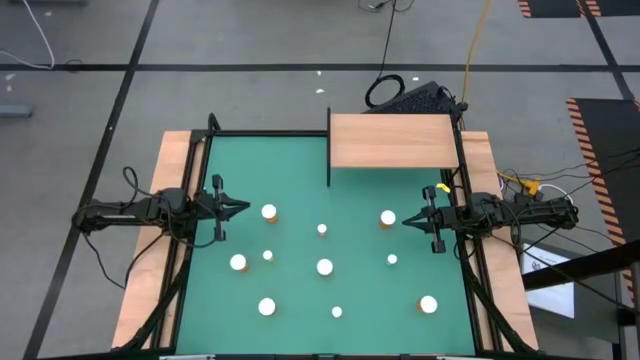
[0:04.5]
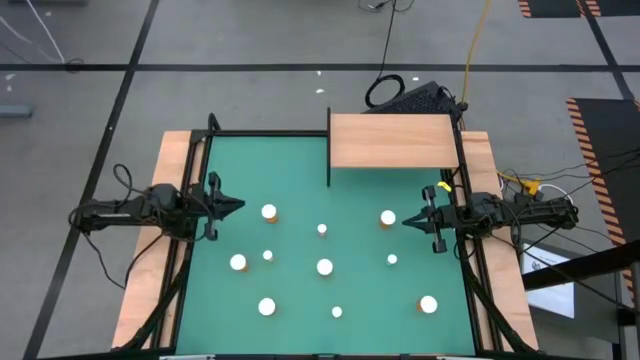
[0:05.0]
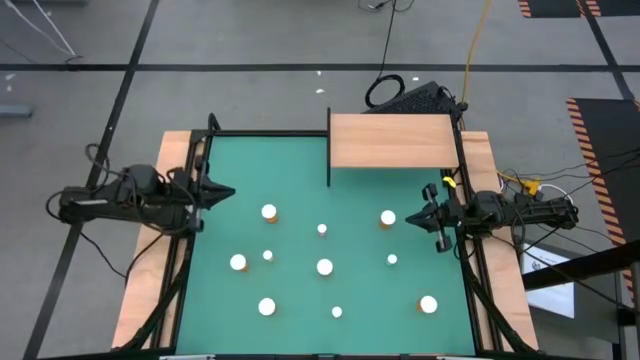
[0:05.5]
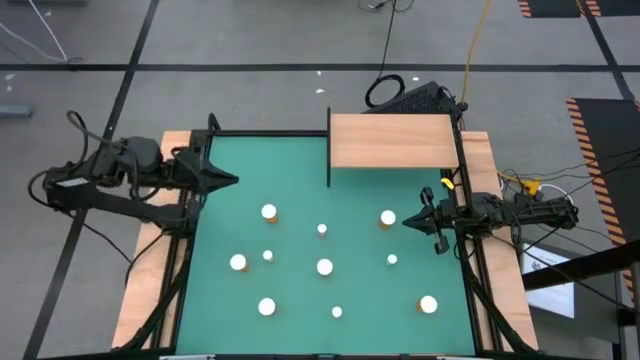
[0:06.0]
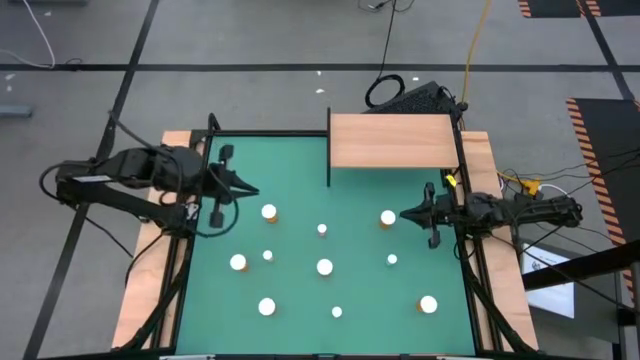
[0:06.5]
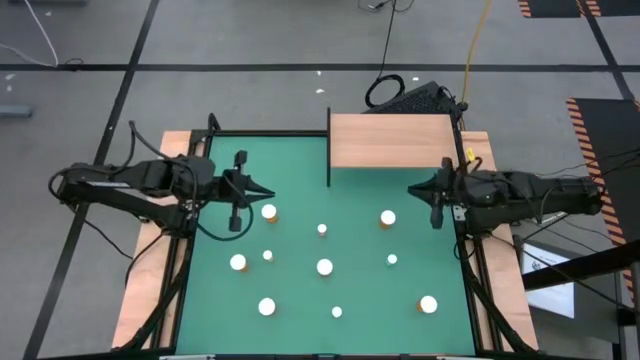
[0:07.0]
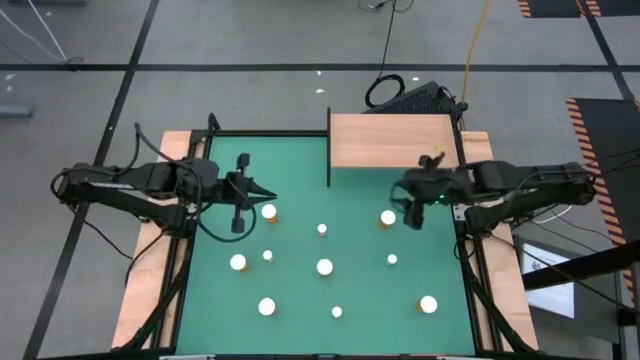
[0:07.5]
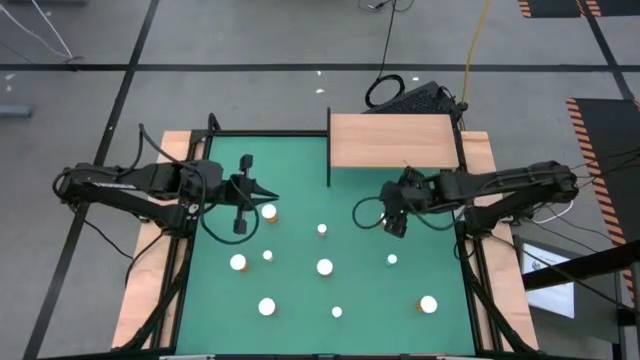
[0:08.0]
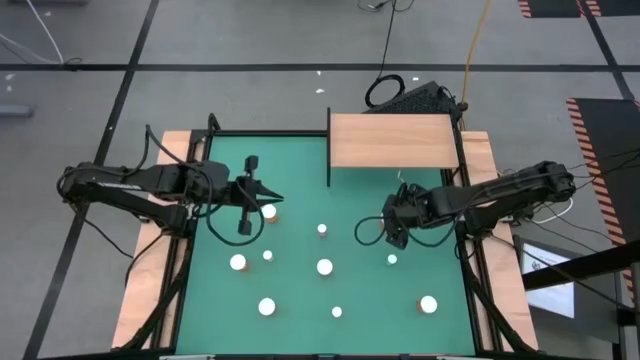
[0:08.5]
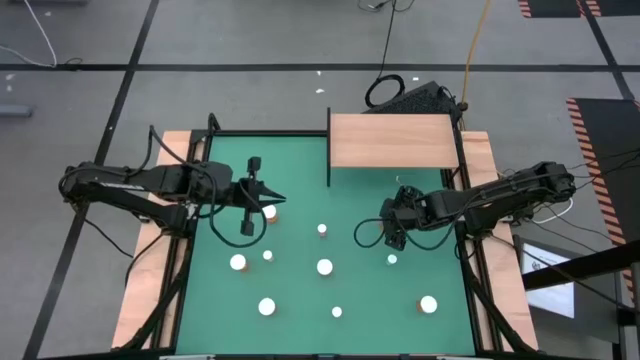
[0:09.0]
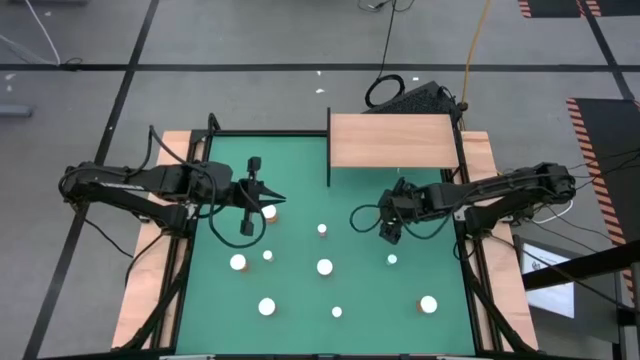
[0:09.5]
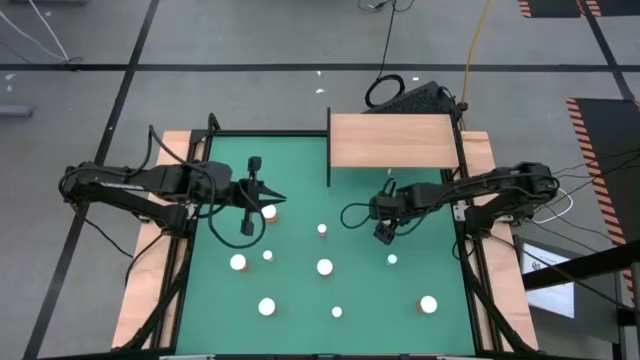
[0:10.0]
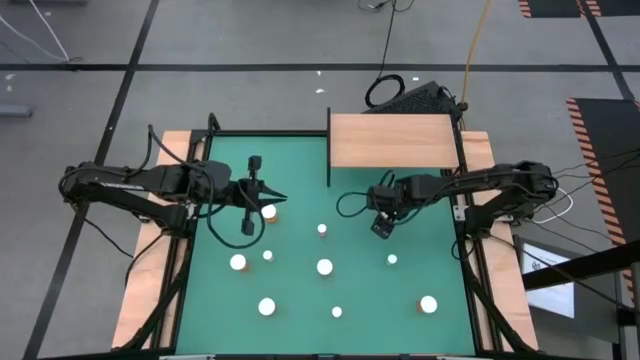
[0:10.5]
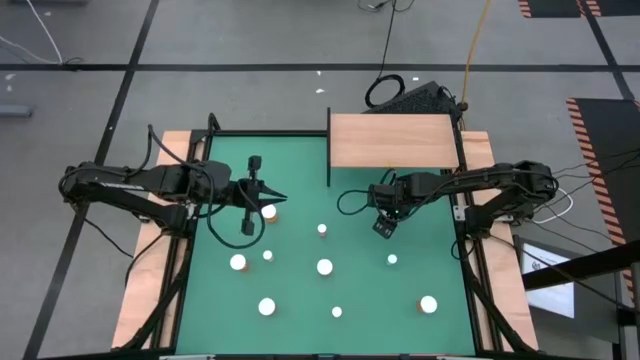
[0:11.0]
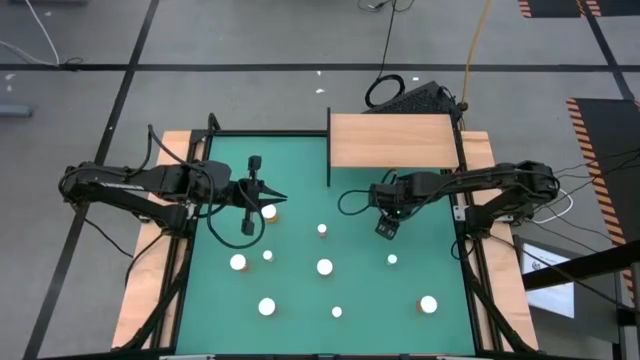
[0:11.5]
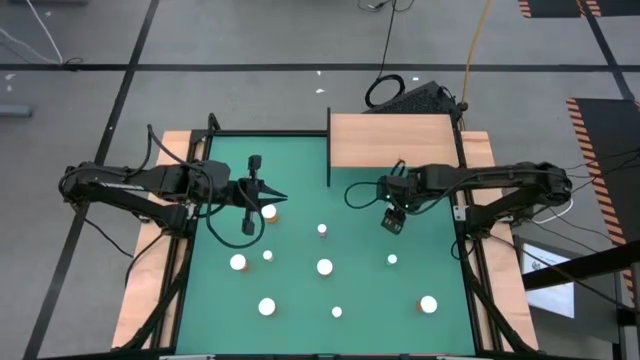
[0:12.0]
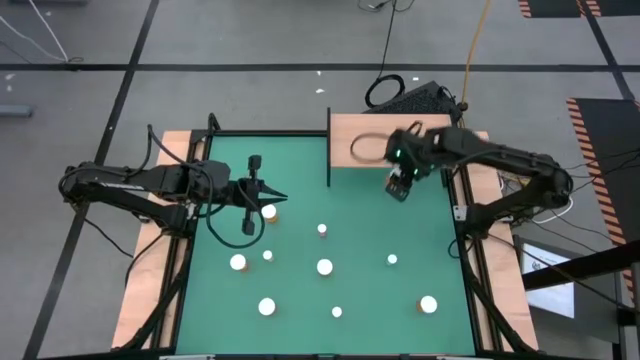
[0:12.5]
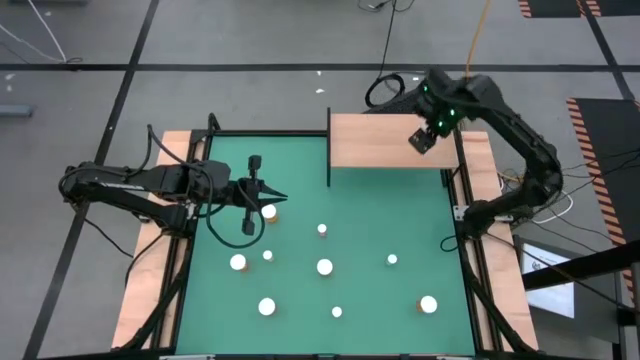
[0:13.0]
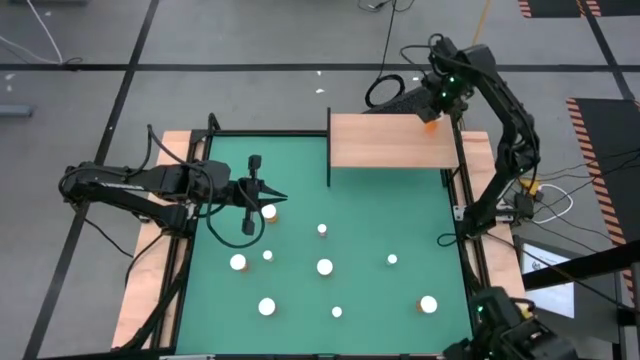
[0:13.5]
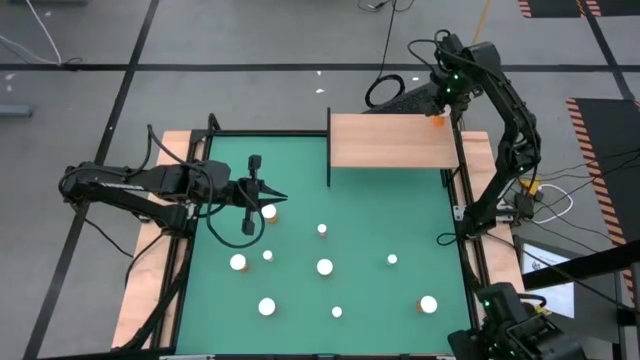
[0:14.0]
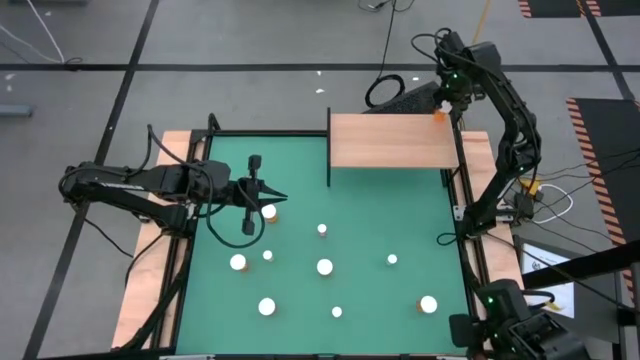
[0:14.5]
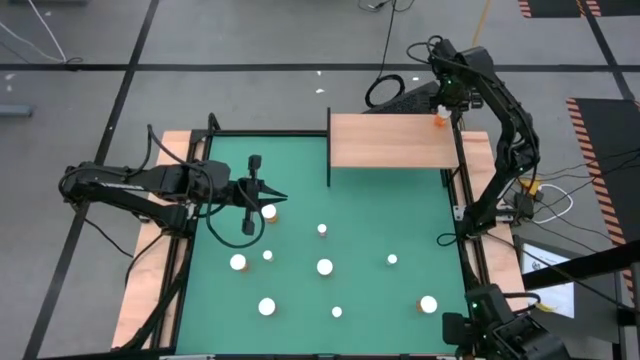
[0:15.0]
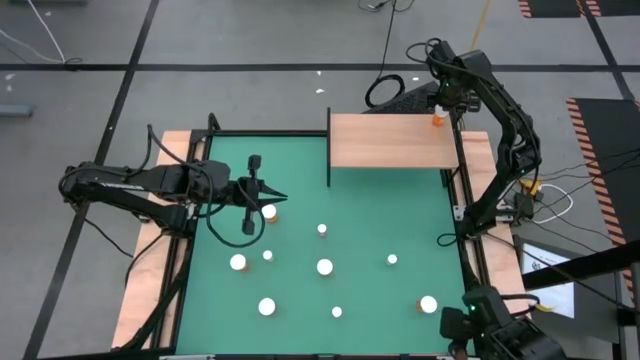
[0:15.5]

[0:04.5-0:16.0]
Task: Pick and place medicine bottles onto shelf by color
Put the orange pill bottle on the shelf

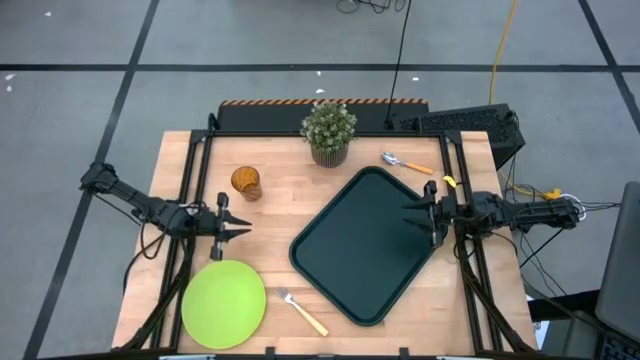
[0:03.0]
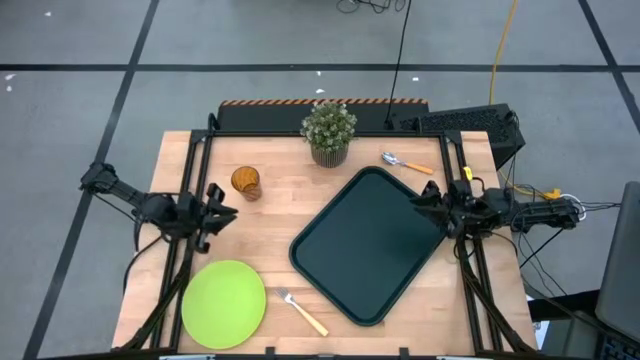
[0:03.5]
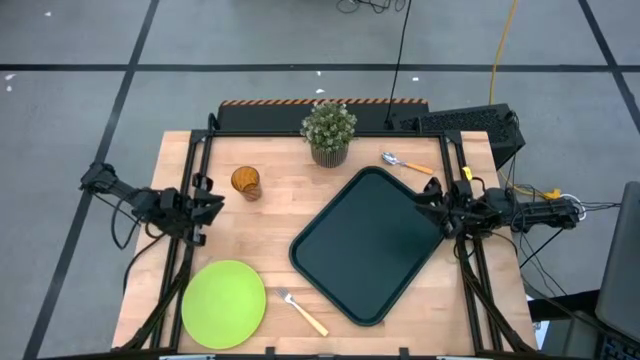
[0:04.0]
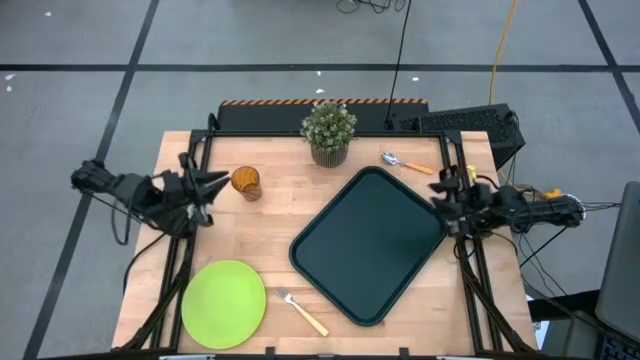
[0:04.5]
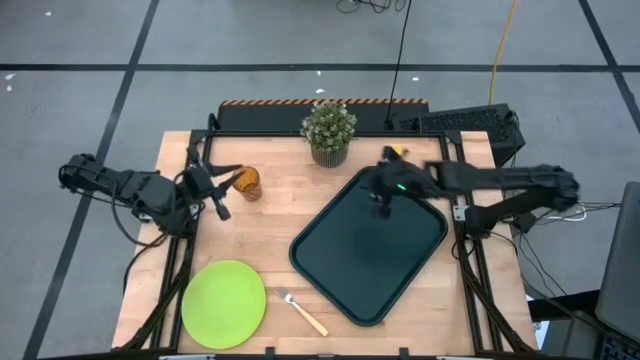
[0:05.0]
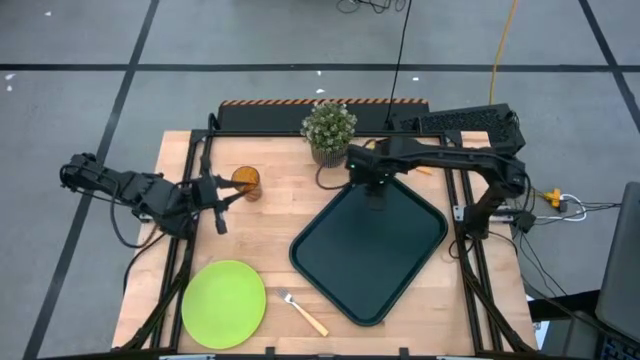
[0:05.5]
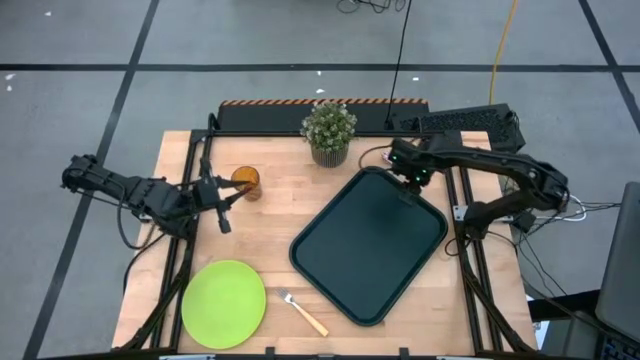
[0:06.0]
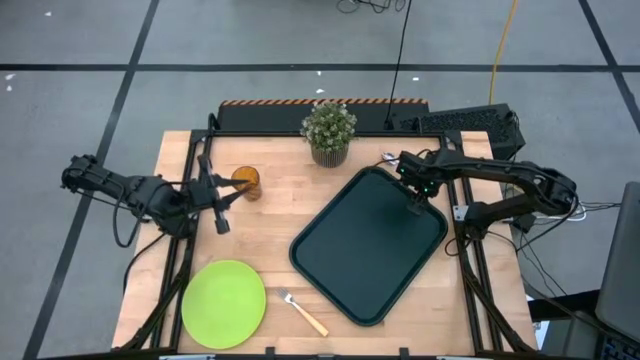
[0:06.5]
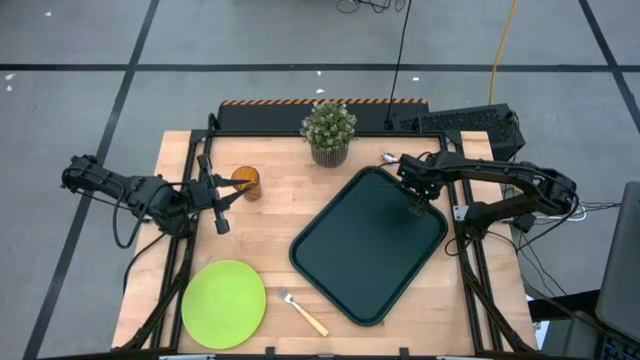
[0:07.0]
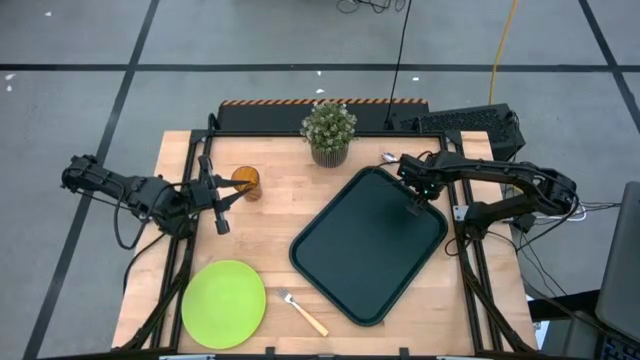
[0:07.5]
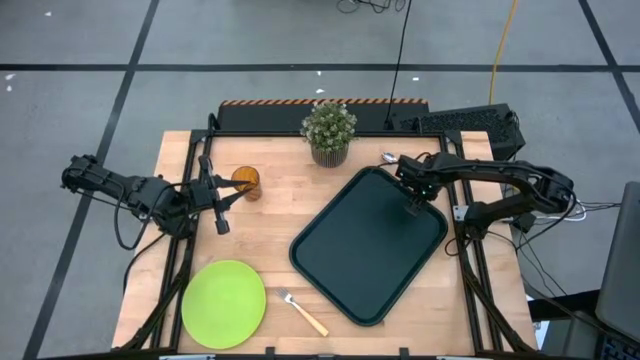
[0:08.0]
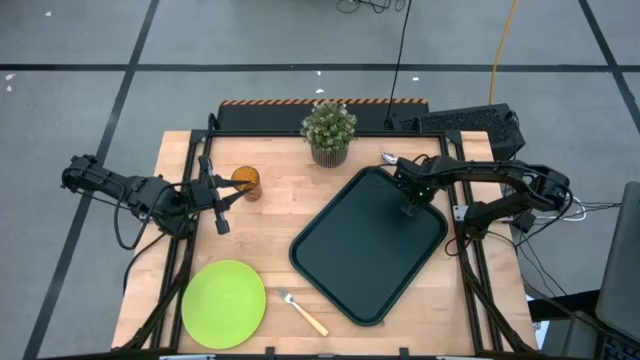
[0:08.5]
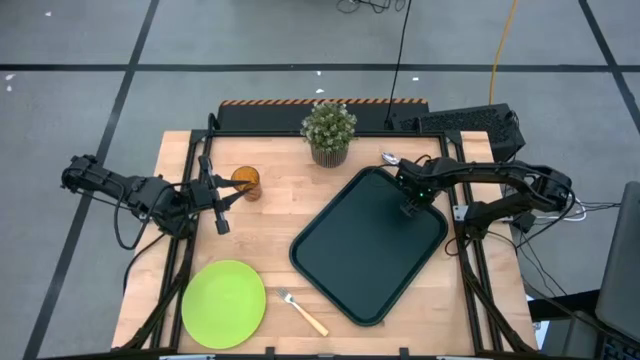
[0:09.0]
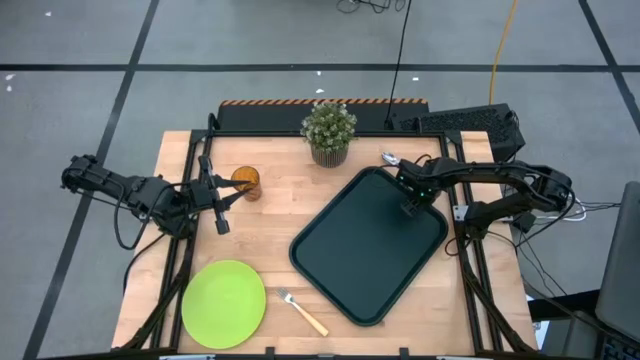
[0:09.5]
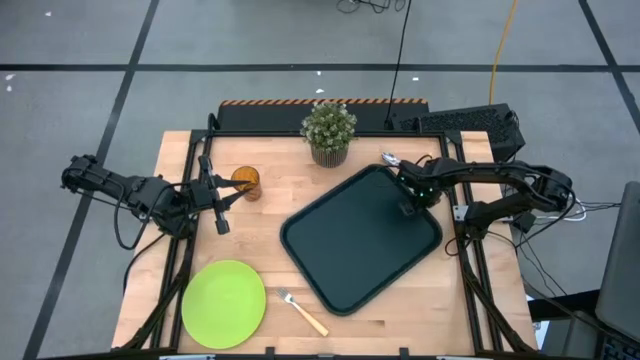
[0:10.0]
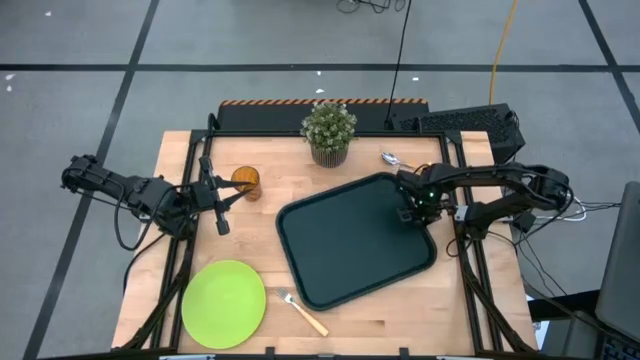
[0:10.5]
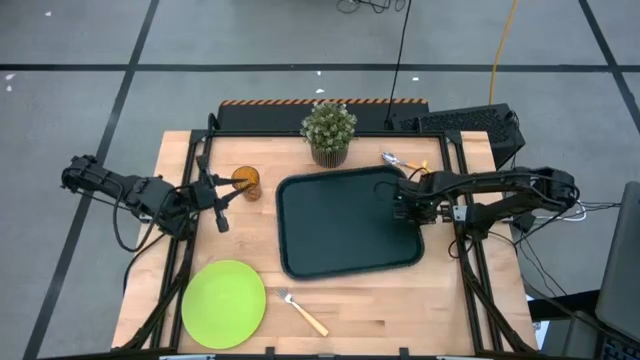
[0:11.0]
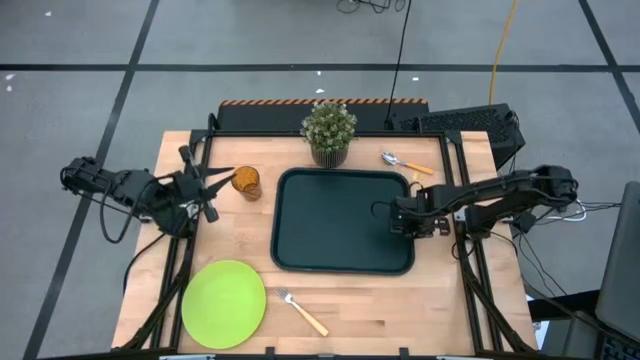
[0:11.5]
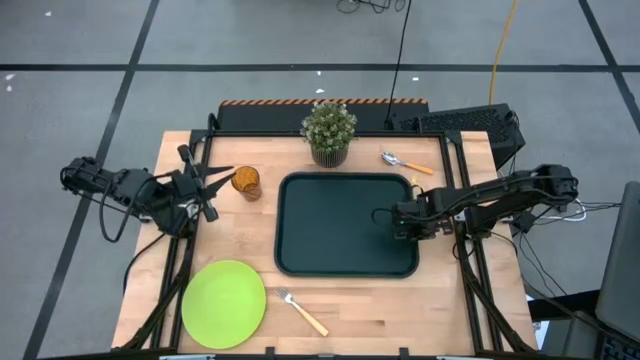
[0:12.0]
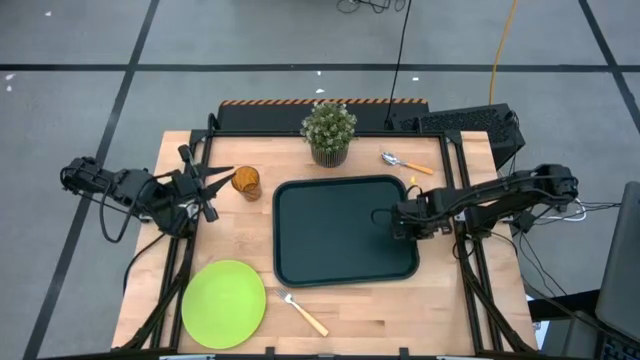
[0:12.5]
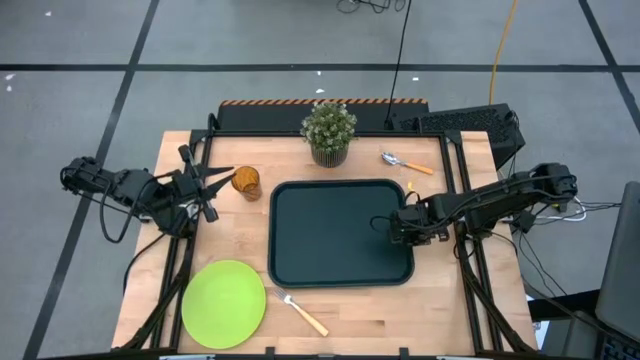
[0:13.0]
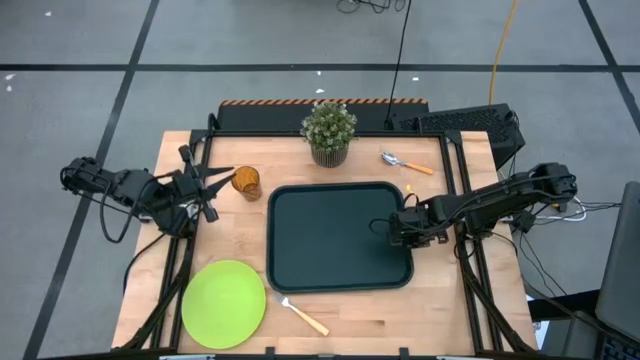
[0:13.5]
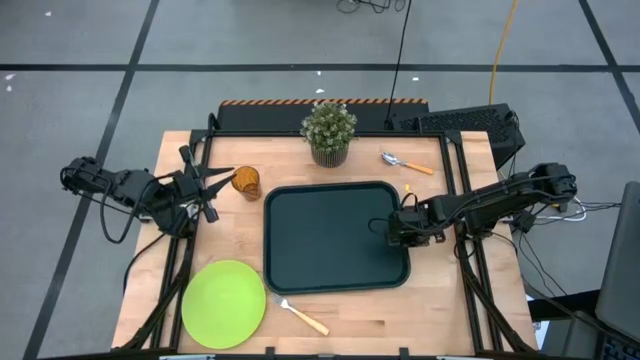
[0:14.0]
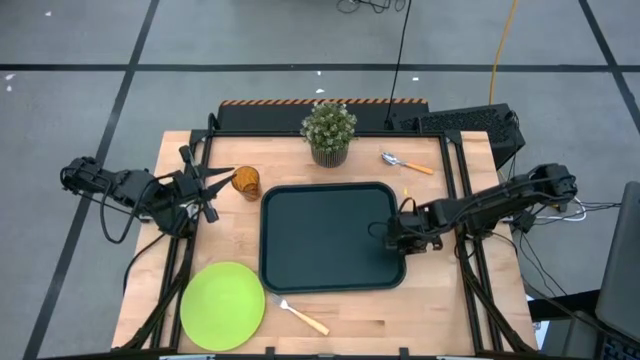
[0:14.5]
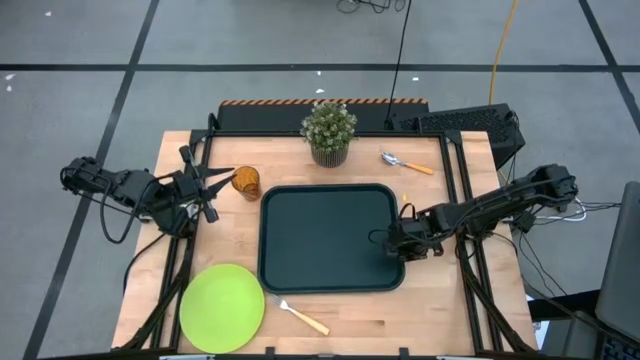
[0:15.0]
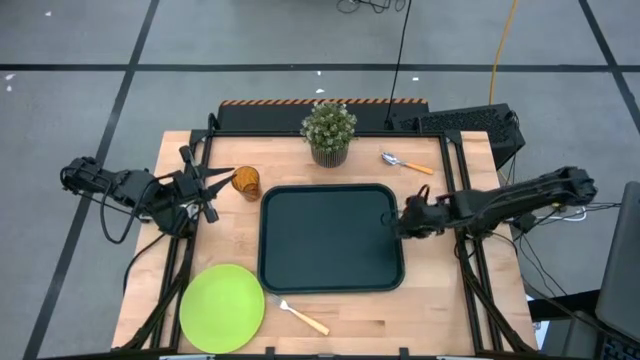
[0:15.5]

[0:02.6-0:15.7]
Task: Pick and place plate/cup/fork/spoon on tray
Adjust the serving tray on the table
